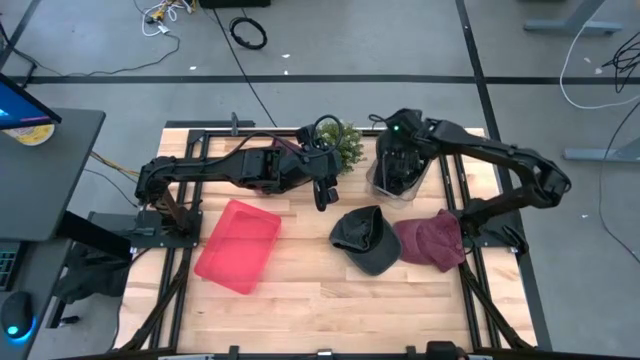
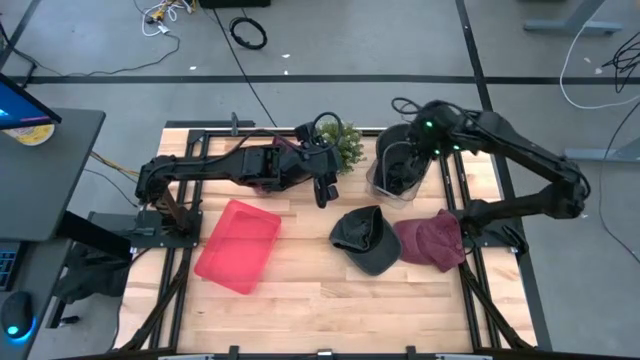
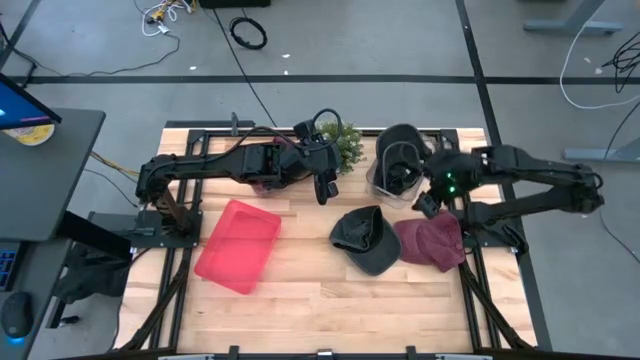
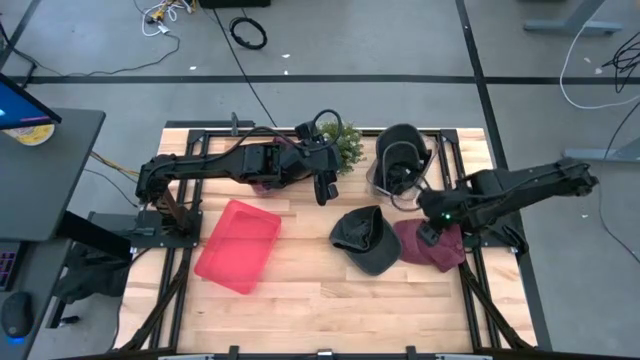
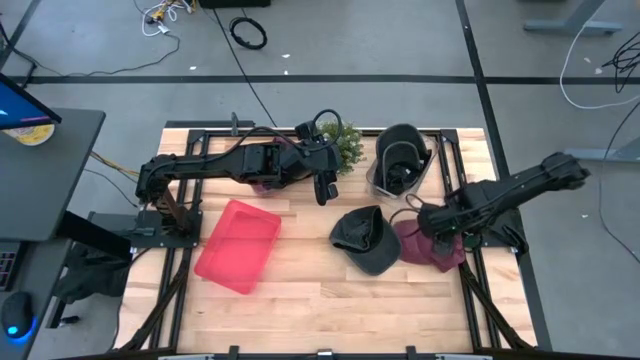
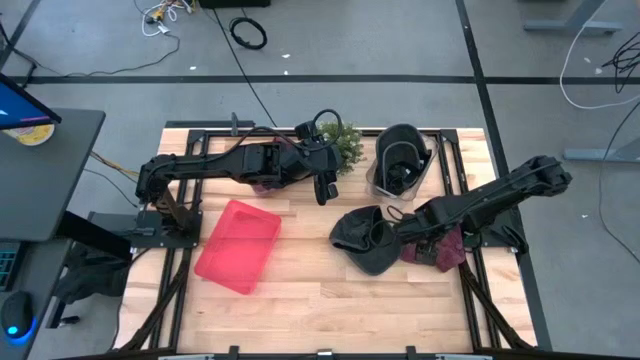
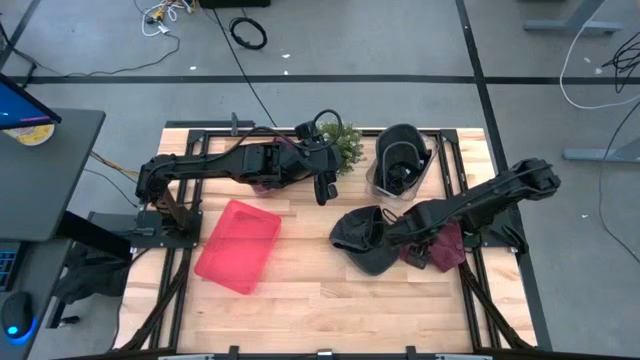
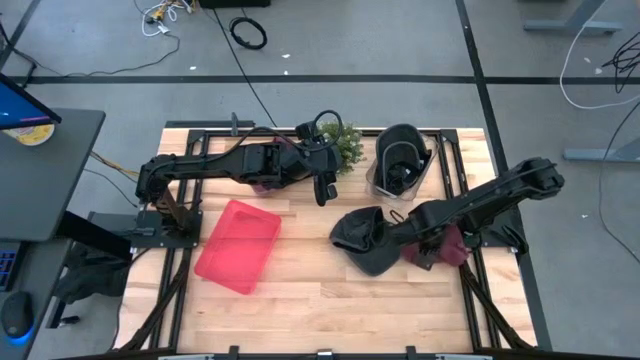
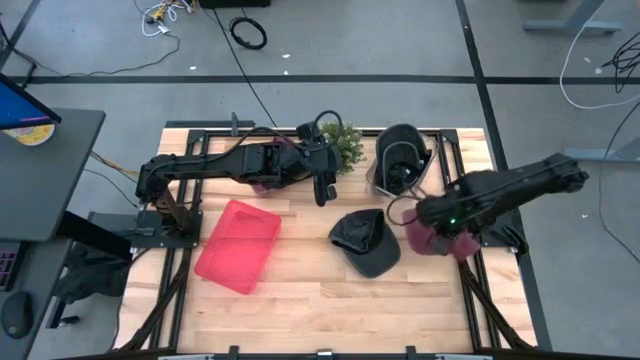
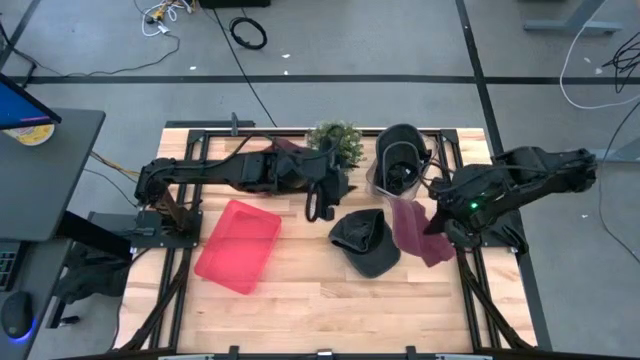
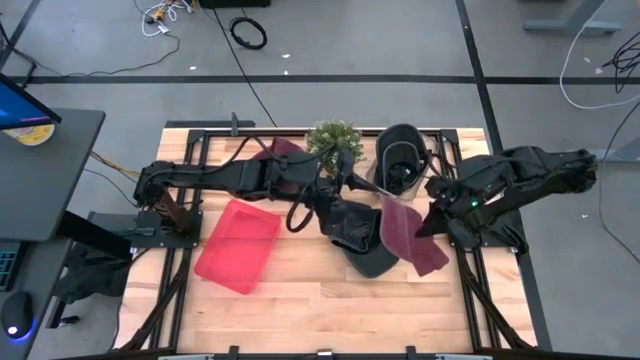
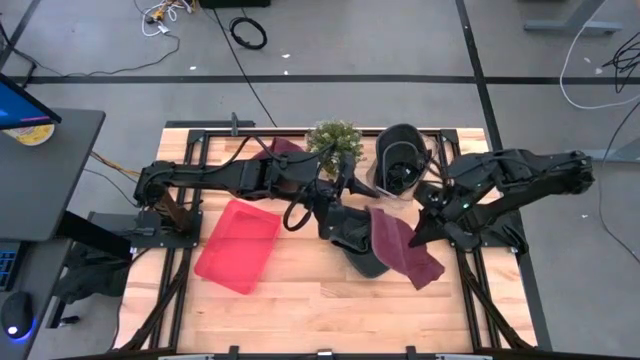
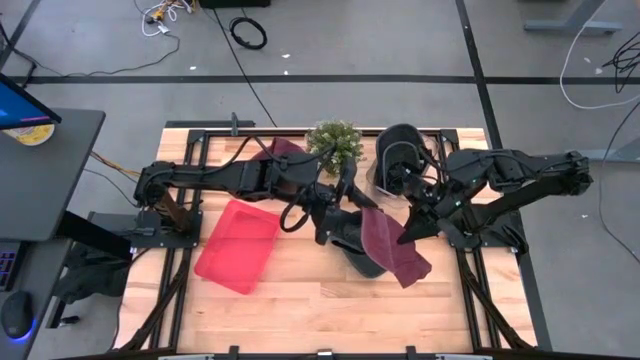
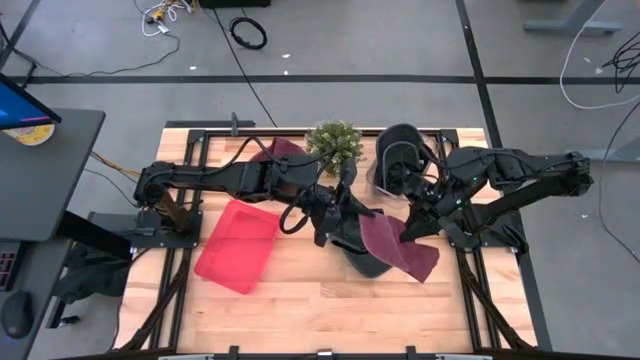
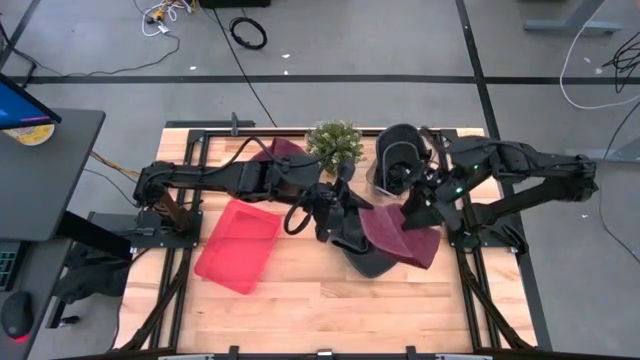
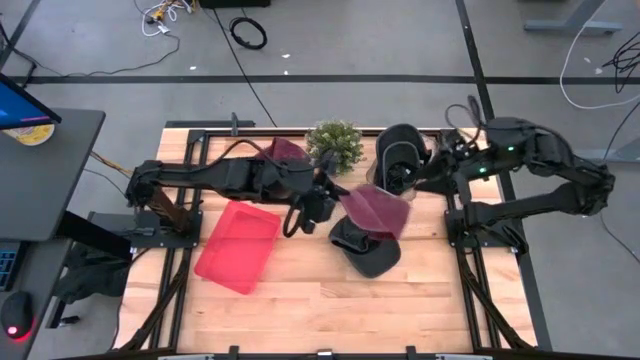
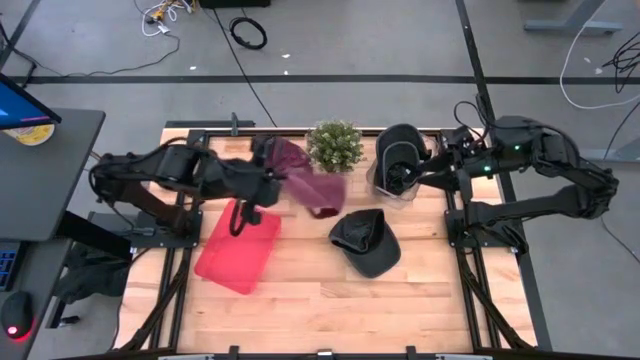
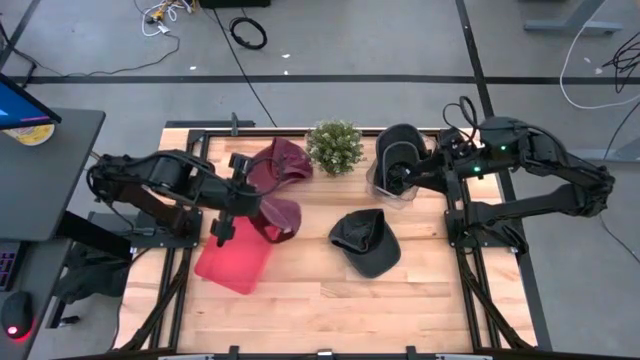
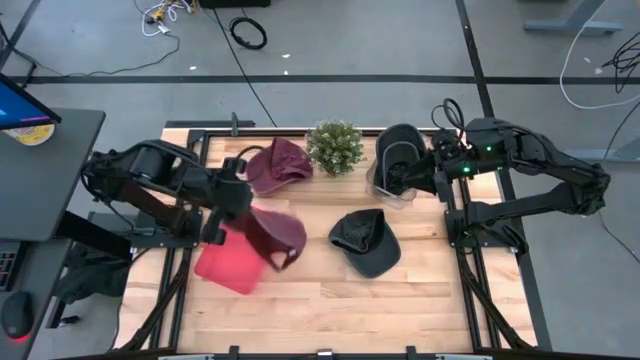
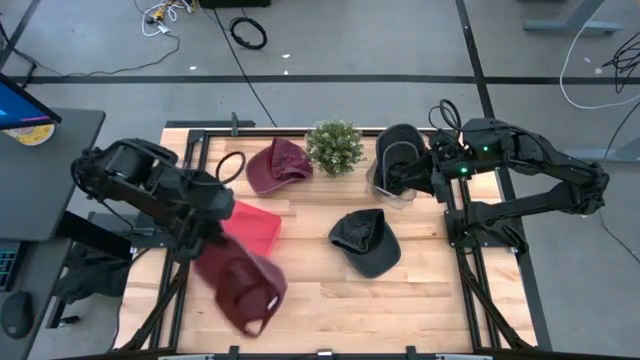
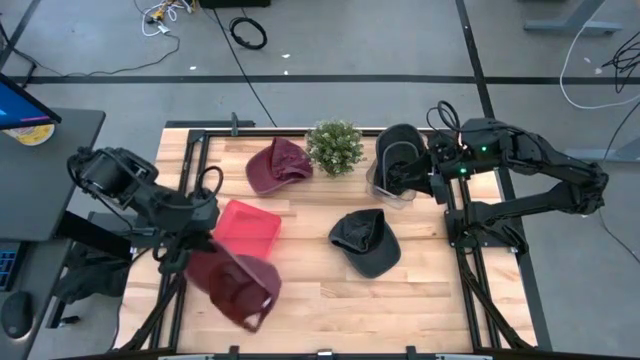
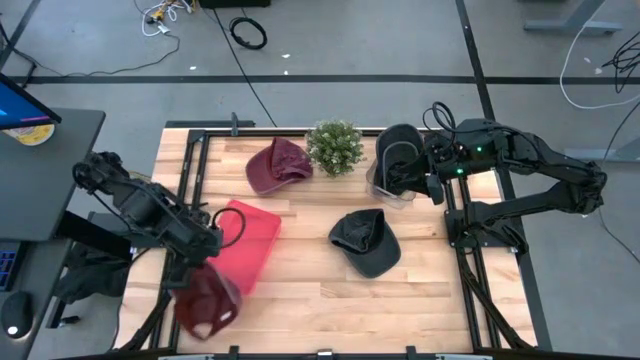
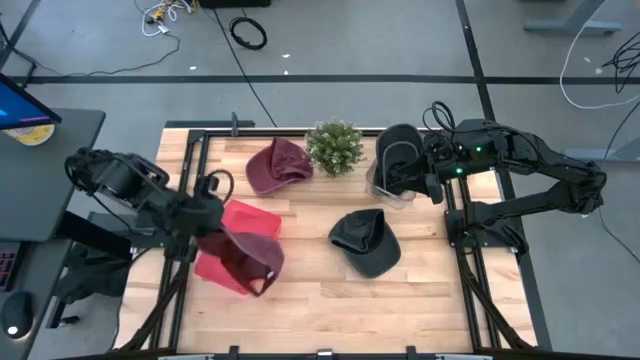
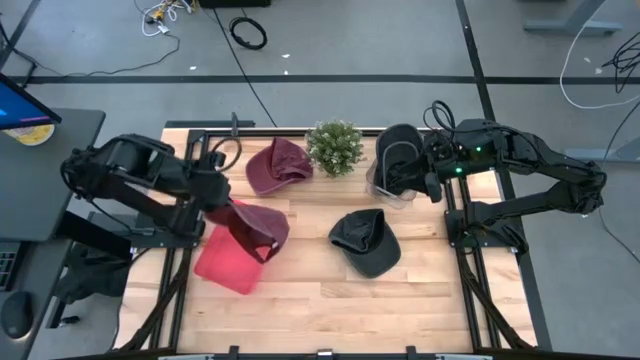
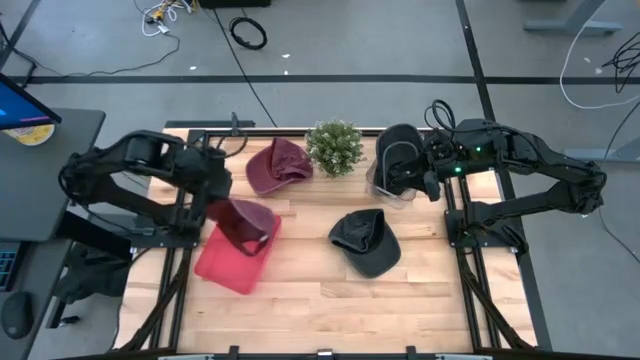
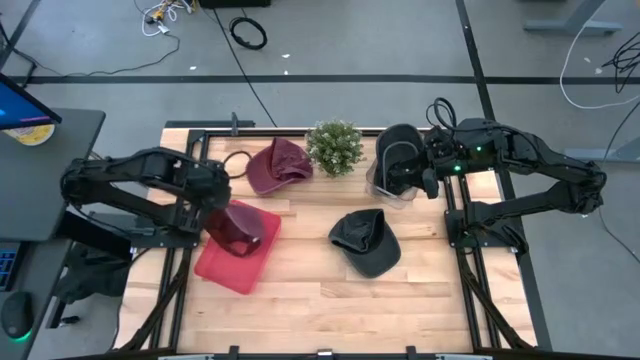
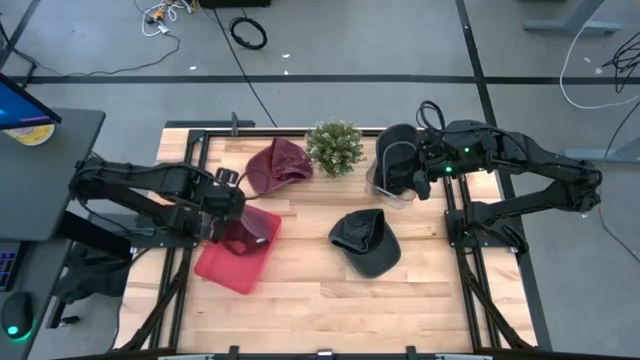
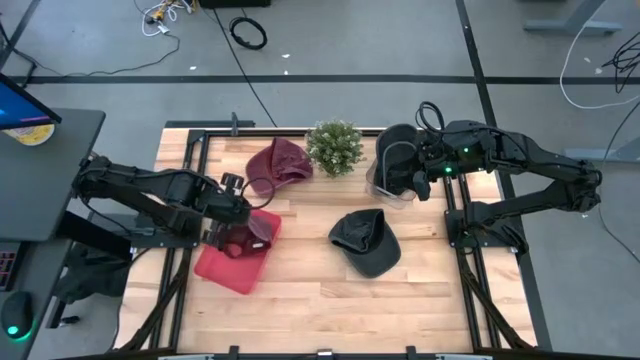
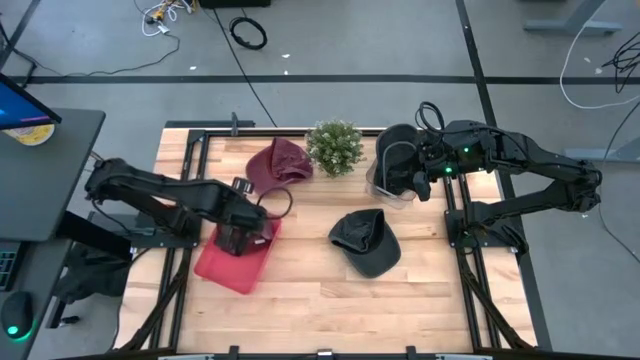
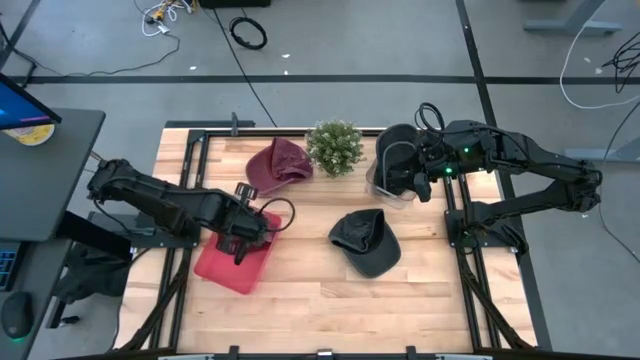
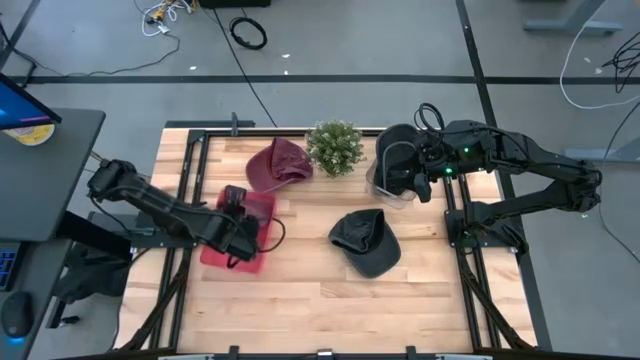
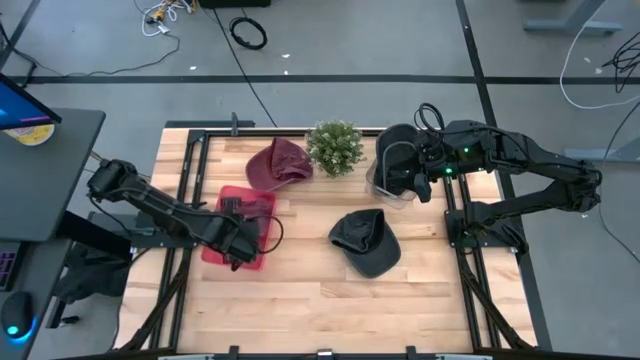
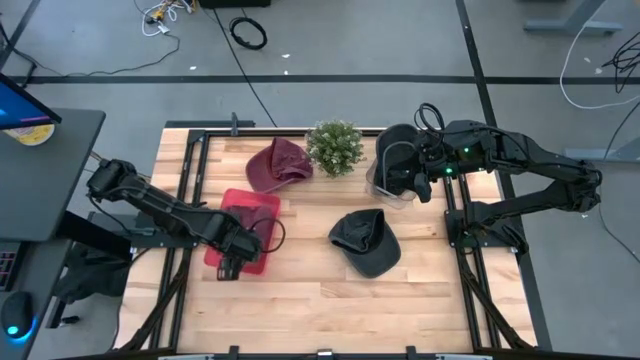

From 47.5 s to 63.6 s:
Task: Pick & Place hat
Put the right red cap into the red bin

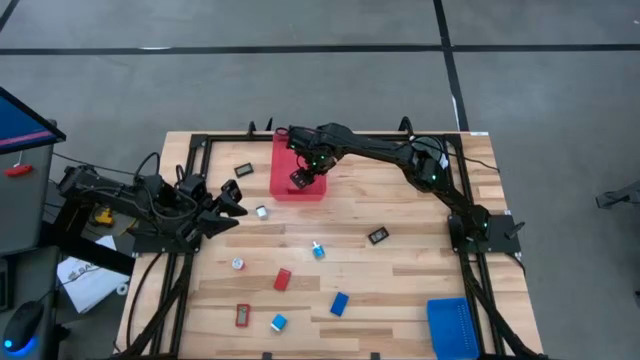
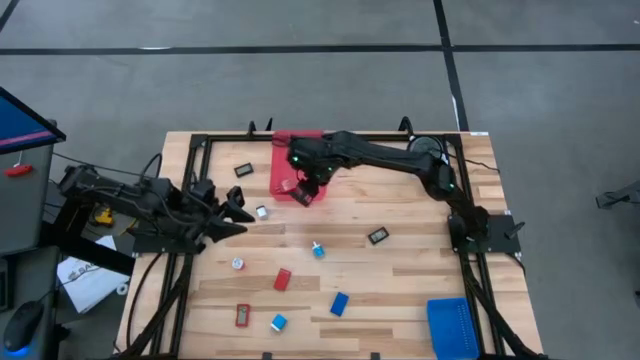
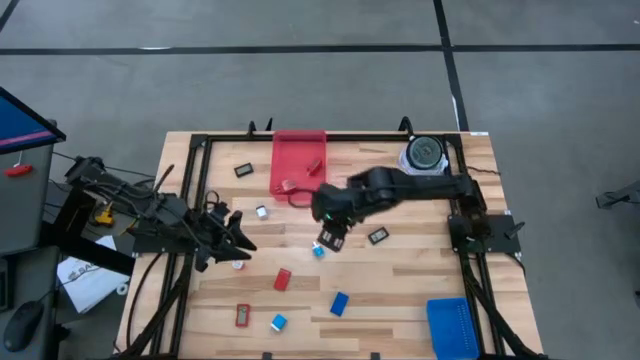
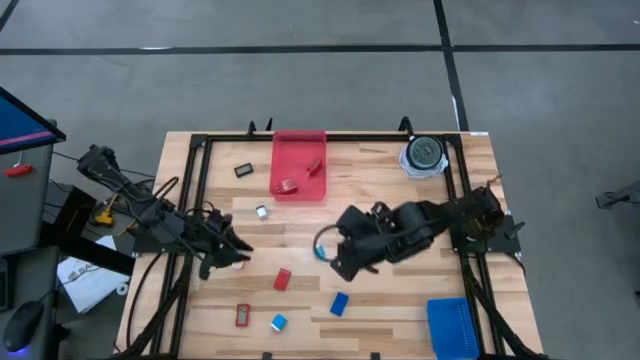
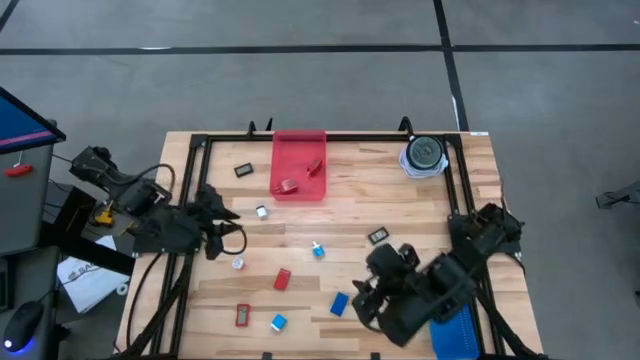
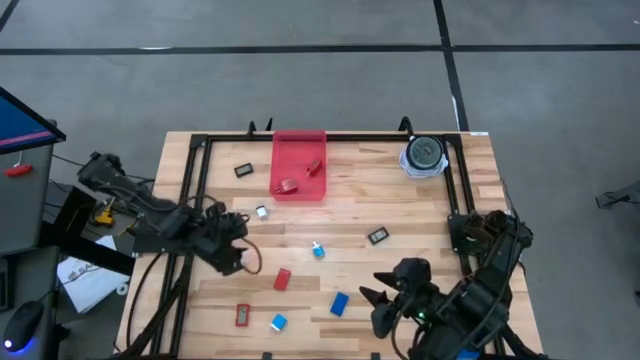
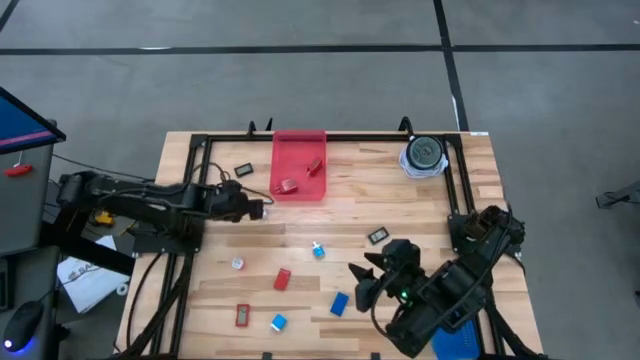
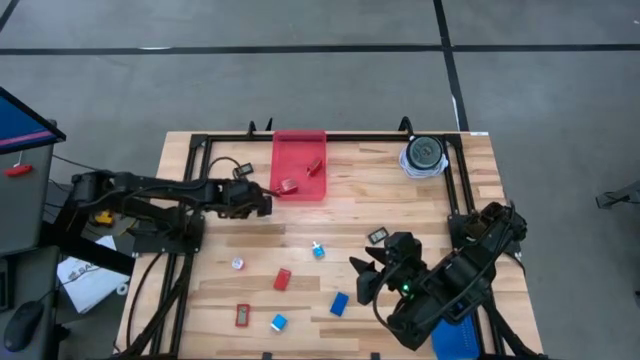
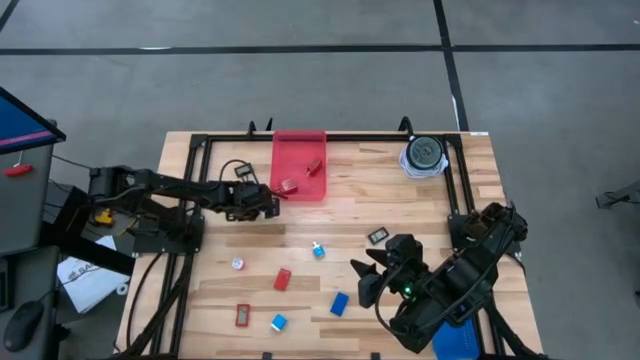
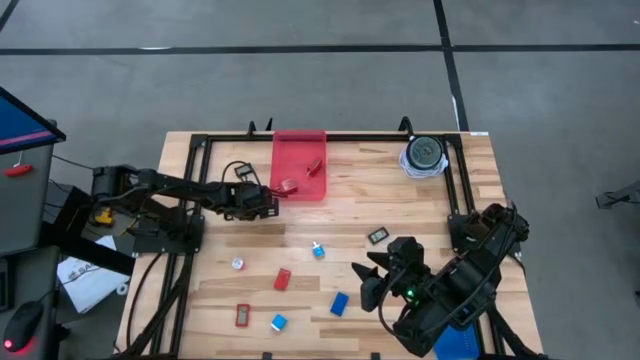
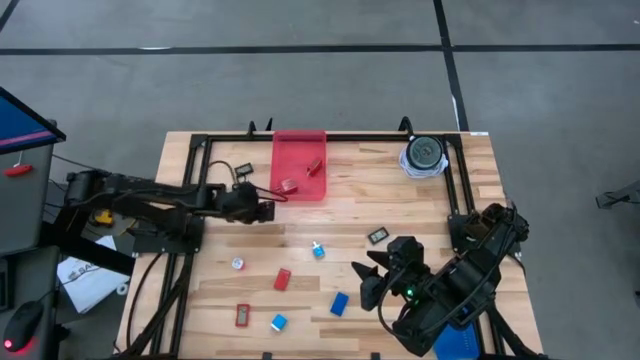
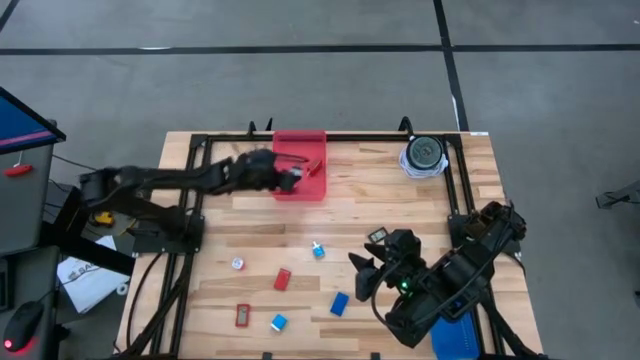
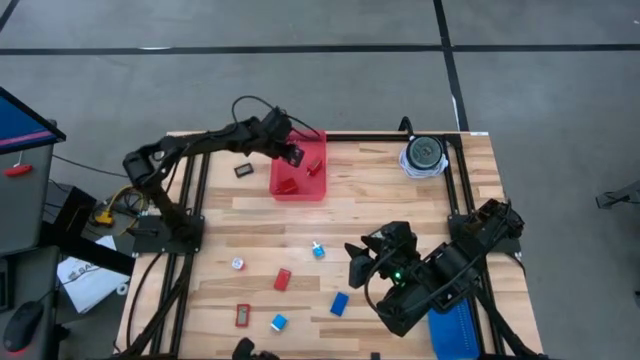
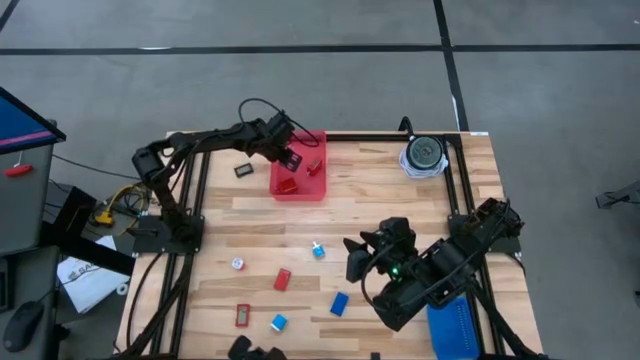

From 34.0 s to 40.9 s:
Task: Pick & Place Office items
Put the white and black charger adapter into the red bin
